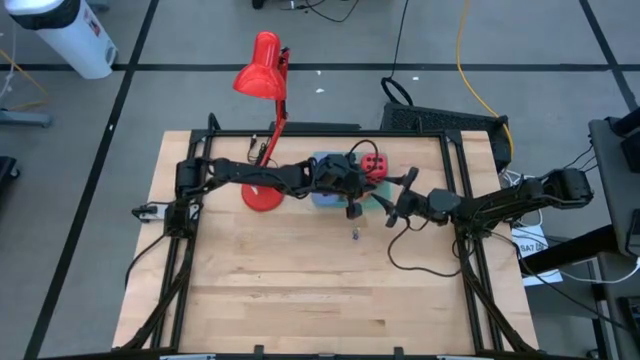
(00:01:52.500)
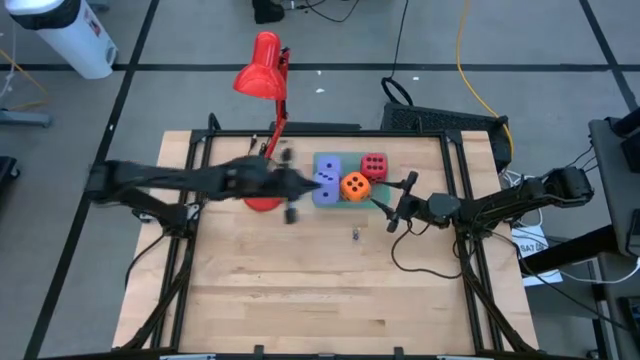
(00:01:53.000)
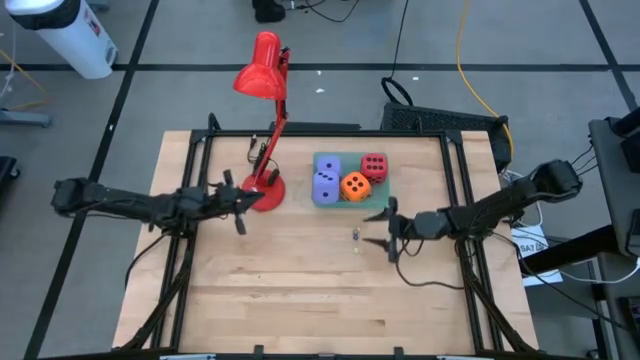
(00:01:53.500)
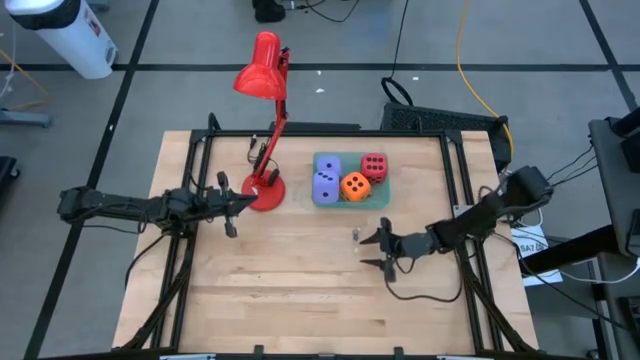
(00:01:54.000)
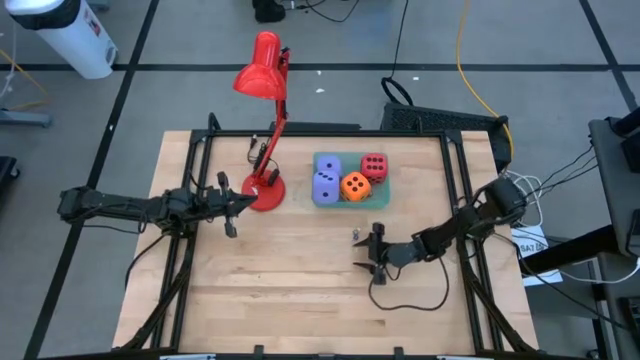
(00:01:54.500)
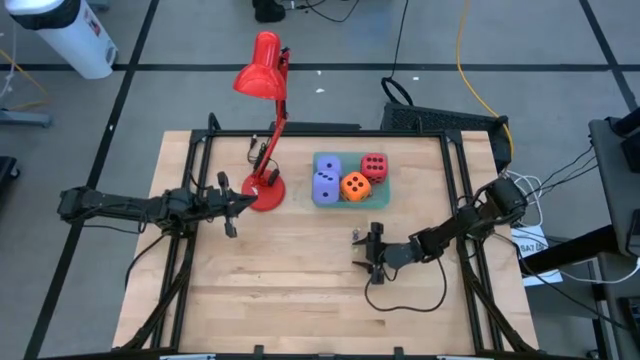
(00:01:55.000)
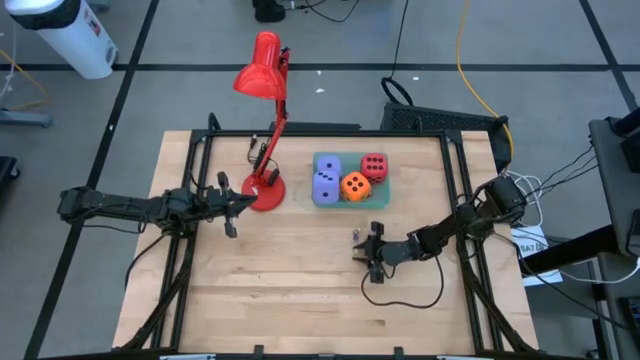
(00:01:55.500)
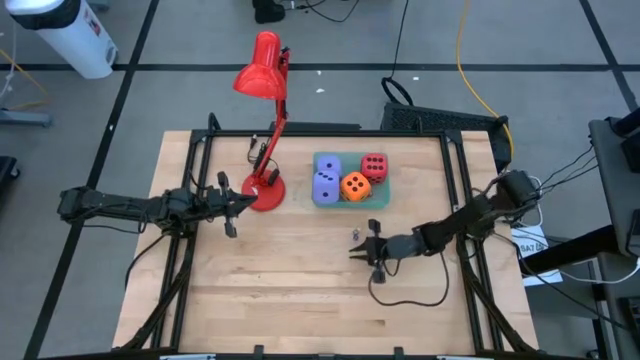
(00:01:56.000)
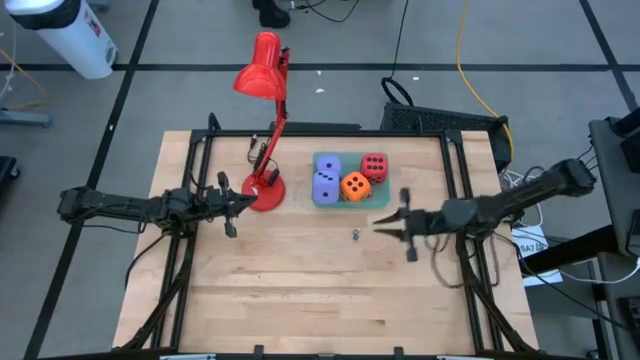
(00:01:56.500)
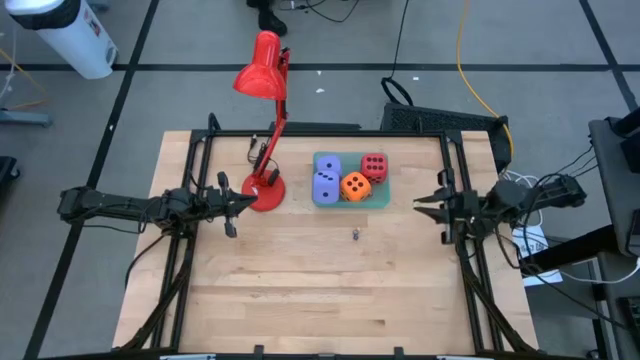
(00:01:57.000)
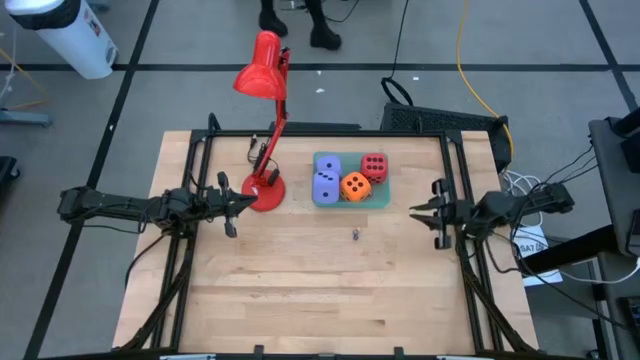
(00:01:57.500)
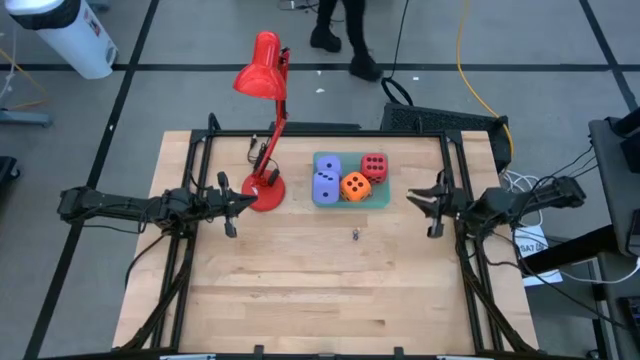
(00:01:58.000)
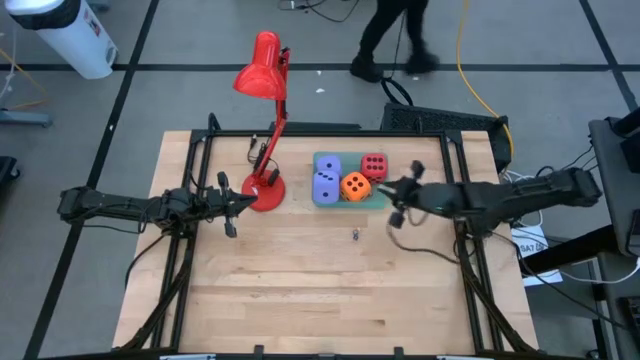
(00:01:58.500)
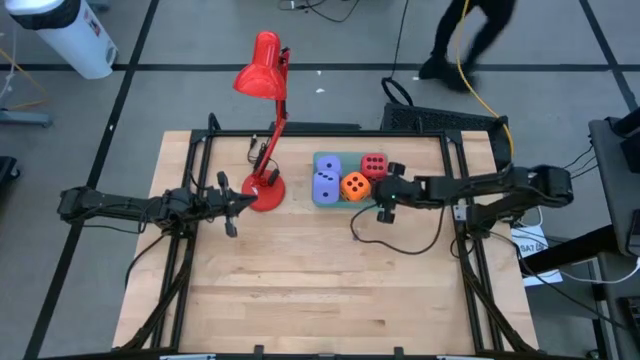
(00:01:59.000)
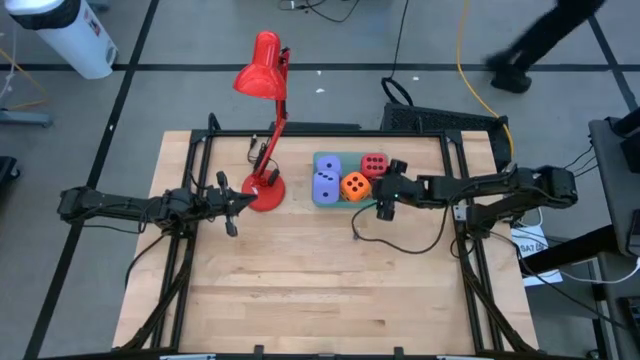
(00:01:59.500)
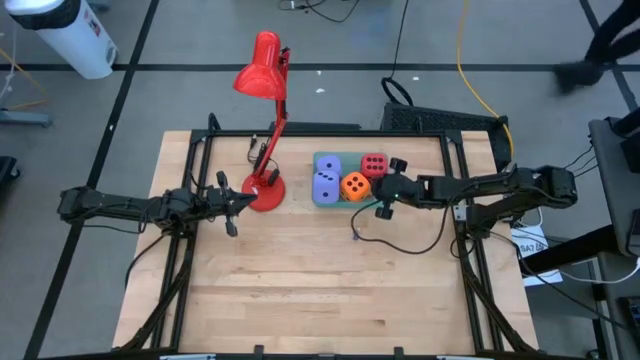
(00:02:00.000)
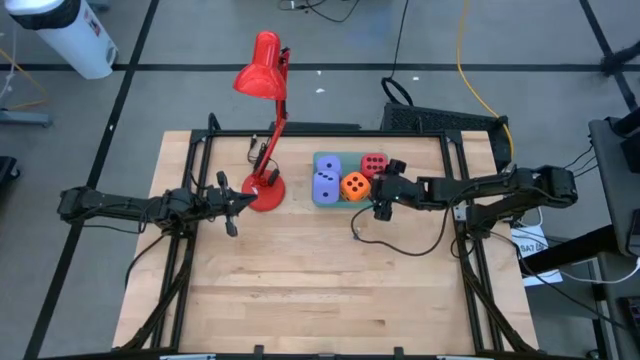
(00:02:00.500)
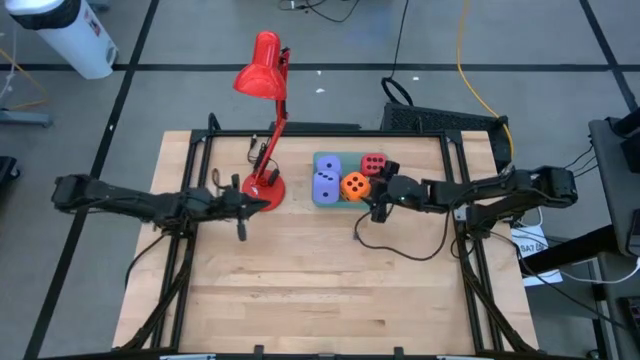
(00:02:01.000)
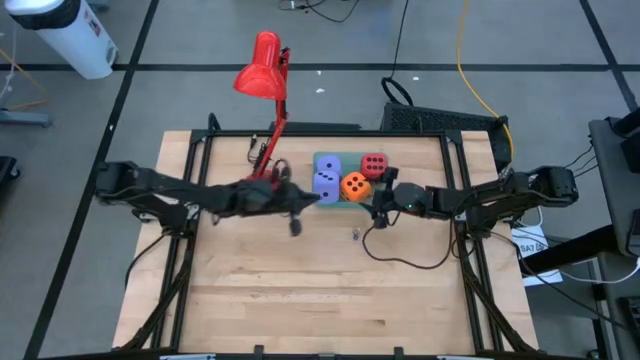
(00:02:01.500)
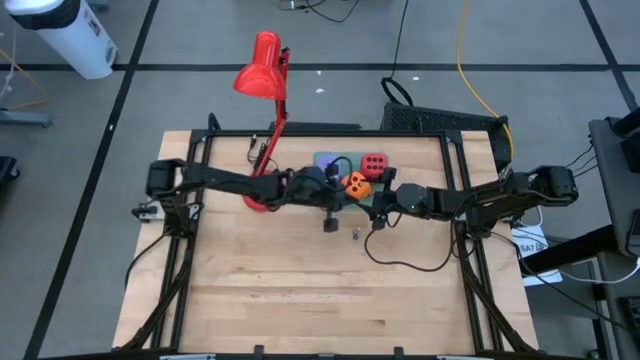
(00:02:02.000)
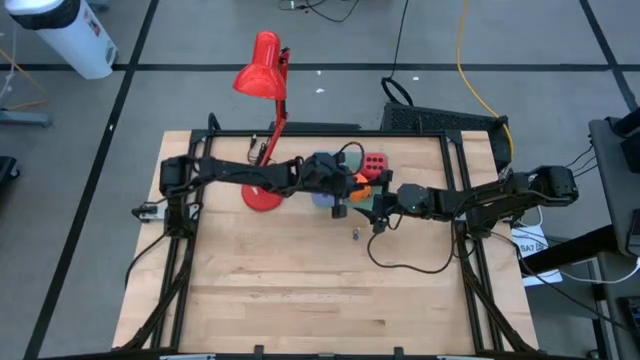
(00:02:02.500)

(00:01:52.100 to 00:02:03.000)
Task: Pick & Place Dice
Put the light green die into the green bin

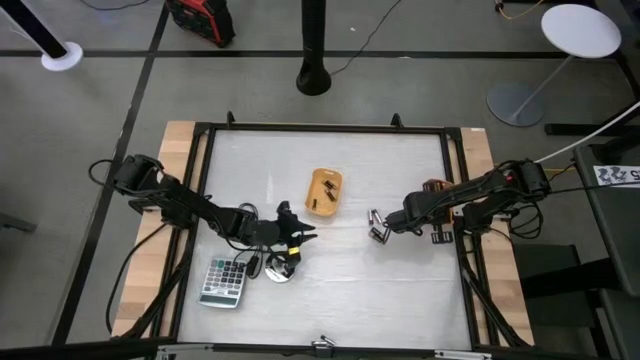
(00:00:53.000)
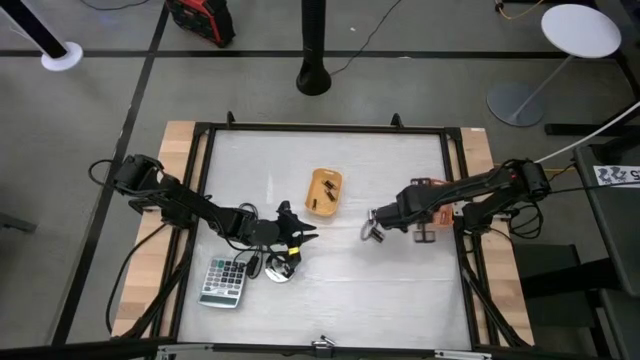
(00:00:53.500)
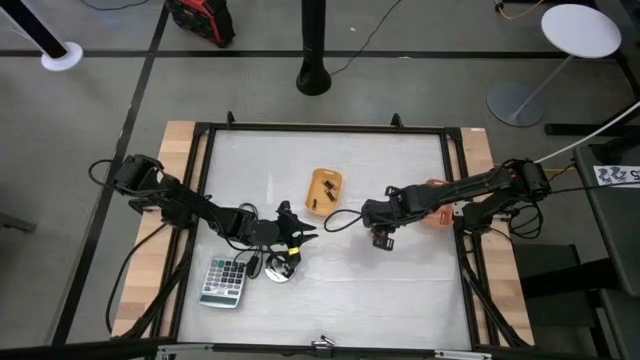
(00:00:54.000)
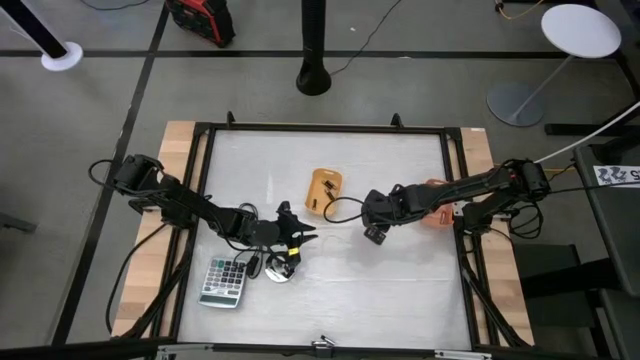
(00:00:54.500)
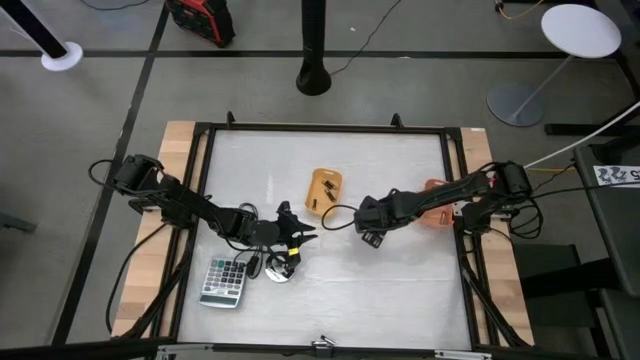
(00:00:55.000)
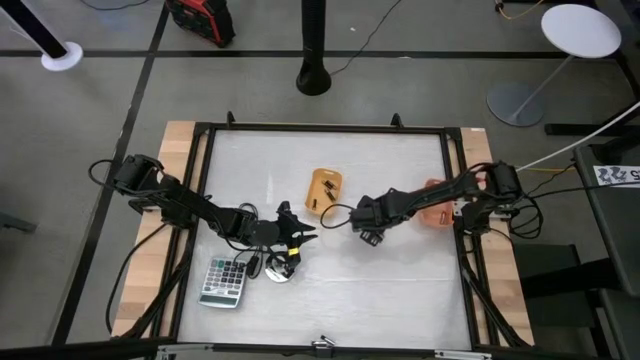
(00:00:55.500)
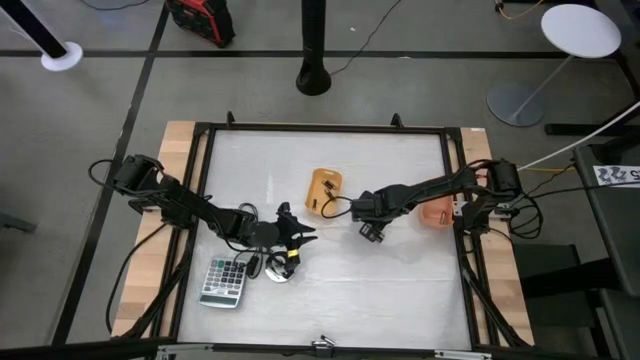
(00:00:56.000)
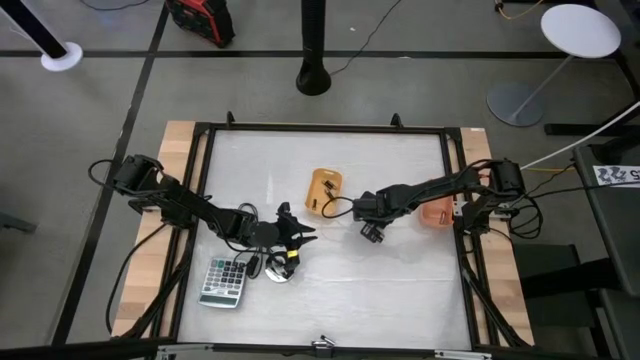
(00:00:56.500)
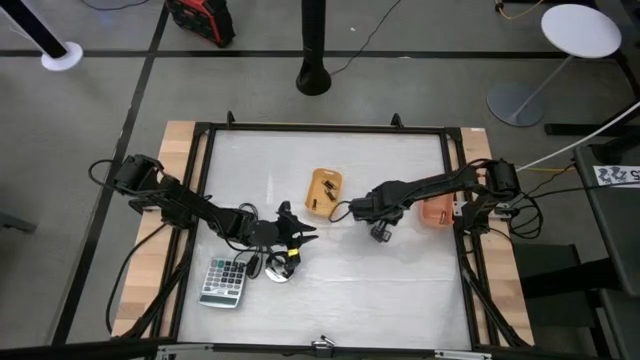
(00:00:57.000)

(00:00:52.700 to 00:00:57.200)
Task: Sort batteries
Put the silver battery into the orange bin

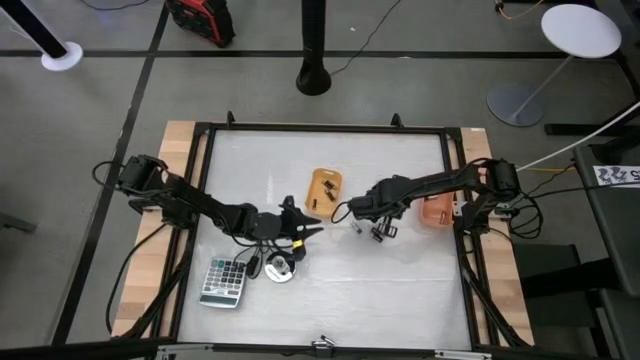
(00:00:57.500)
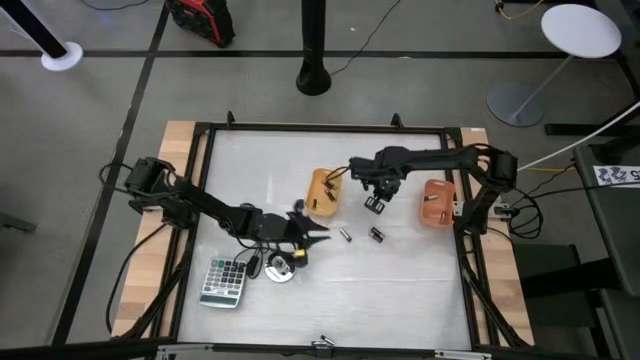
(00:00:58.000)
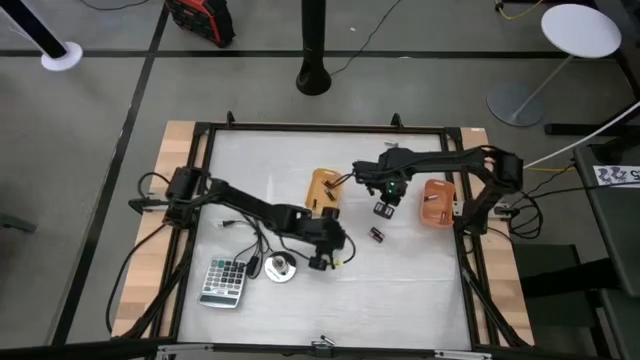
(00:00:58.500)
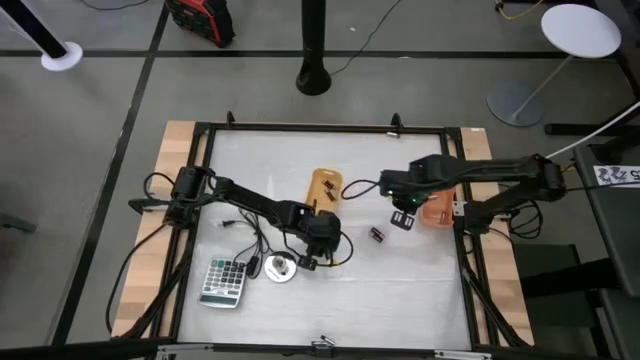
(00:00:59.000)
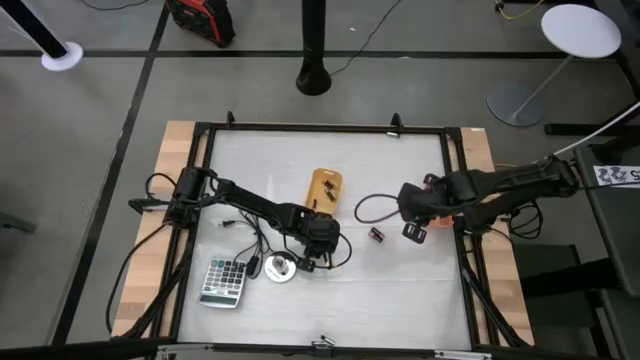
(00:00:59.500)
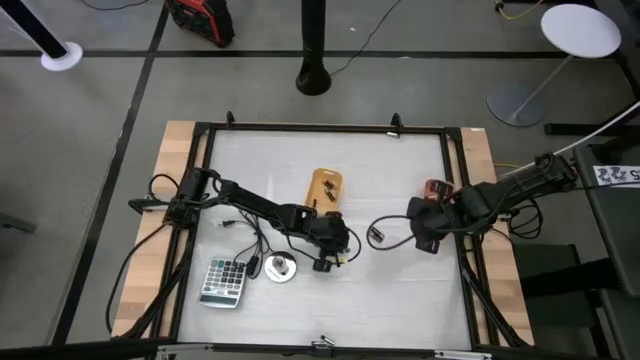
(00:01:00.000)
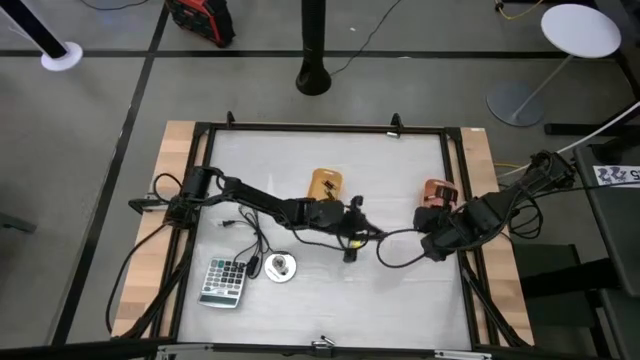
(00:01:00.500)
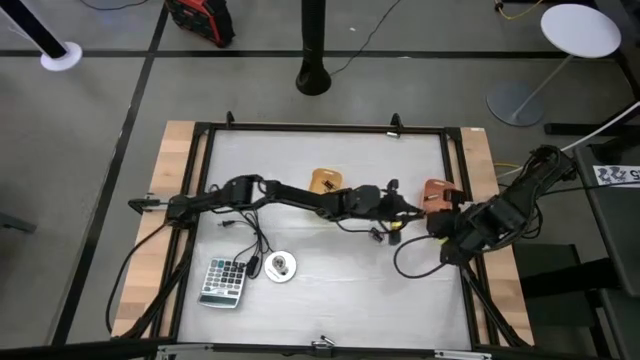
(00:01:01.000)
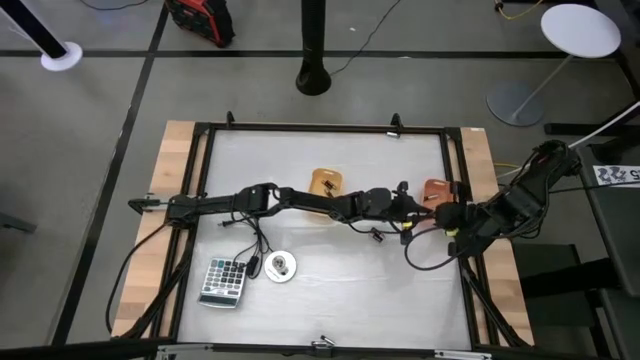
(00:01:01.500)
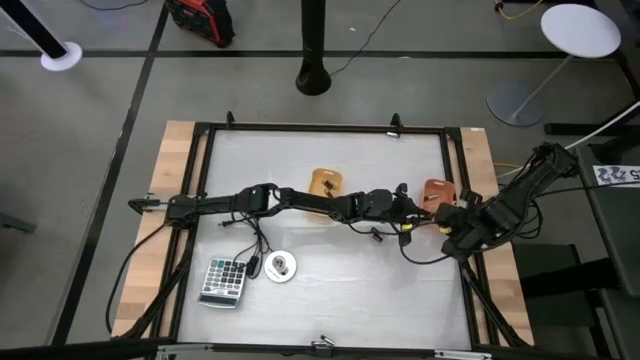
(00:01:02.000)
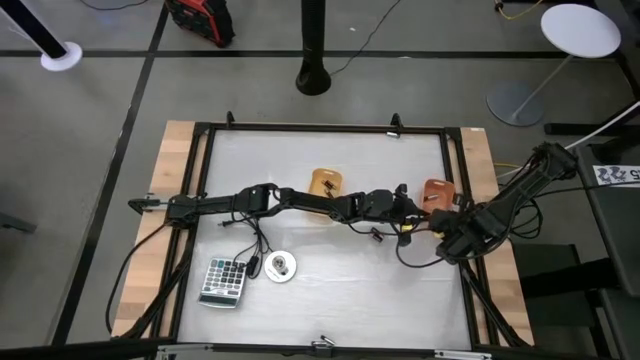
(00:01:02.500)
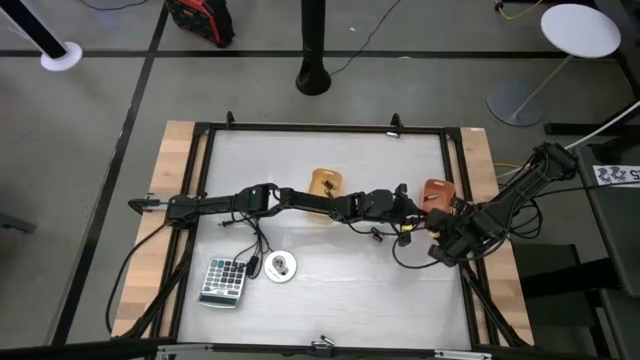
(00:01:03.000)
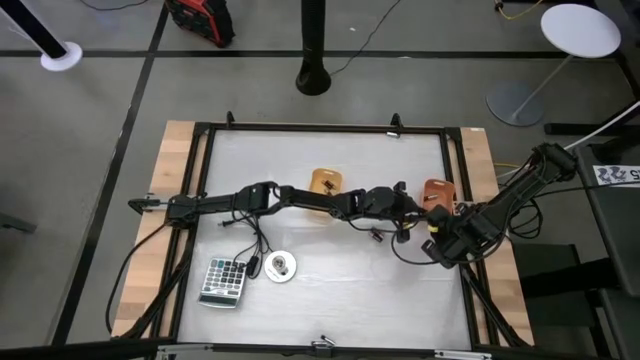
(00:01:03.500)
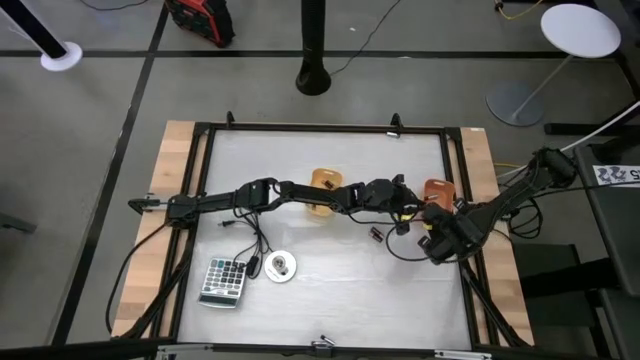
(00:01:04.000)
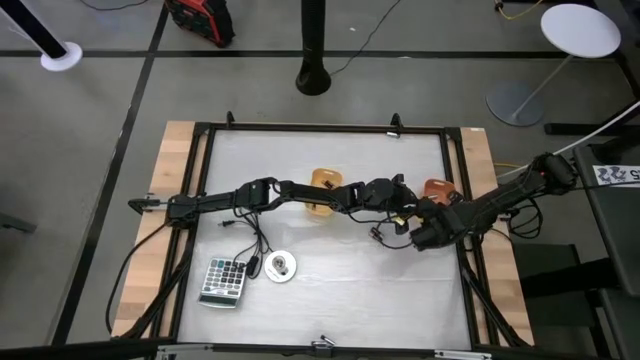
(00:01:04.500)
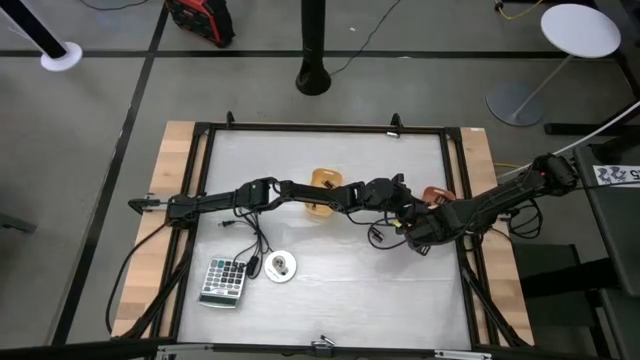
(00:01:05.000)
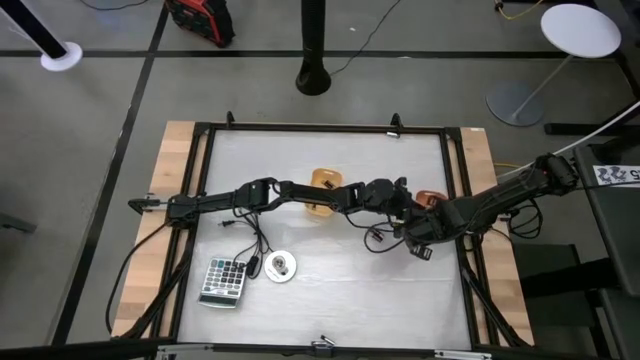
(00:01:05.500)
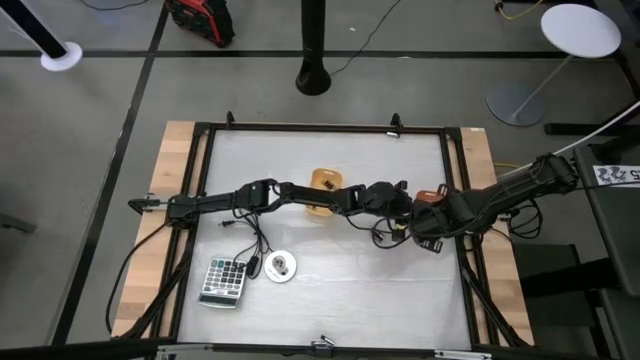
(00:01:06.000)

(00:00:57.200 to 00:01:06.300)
Put the silver battery into the orange bin
